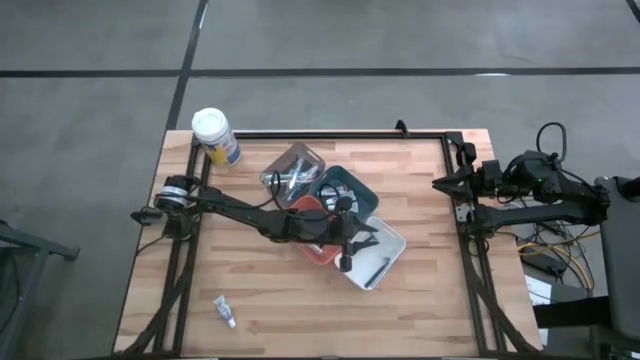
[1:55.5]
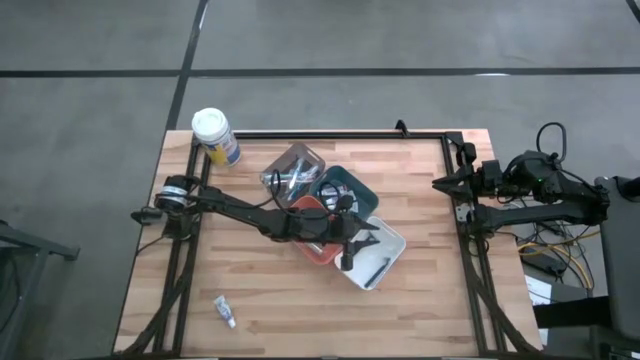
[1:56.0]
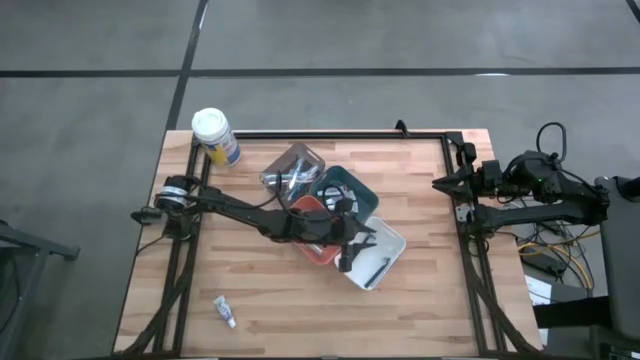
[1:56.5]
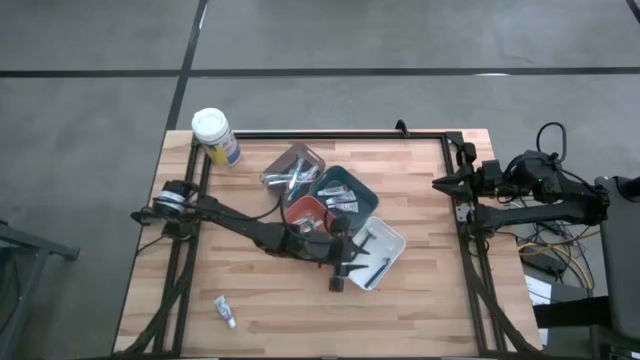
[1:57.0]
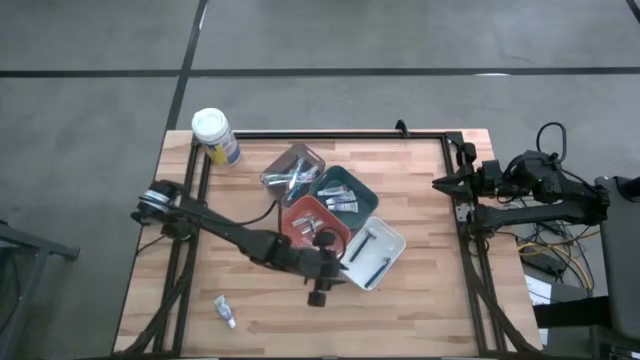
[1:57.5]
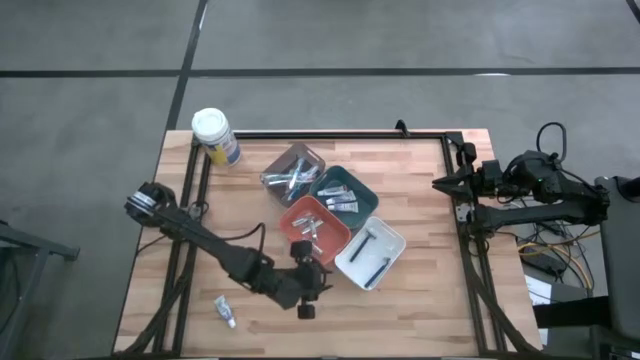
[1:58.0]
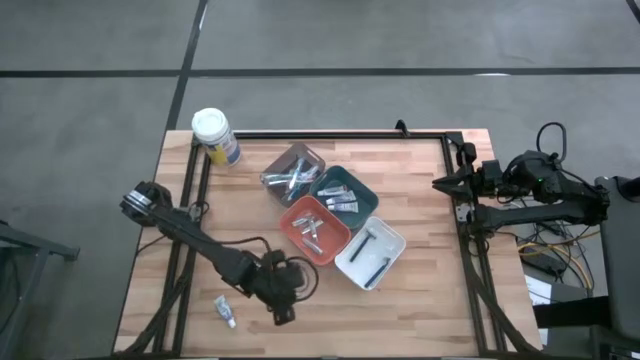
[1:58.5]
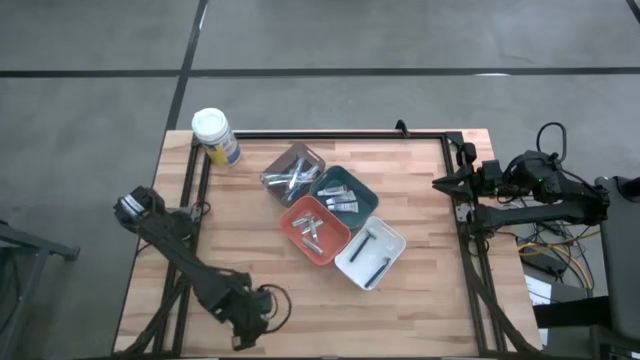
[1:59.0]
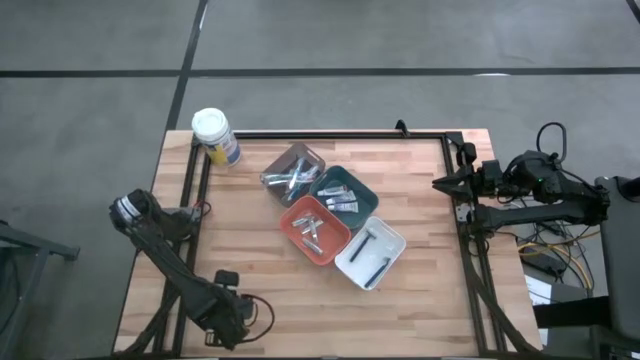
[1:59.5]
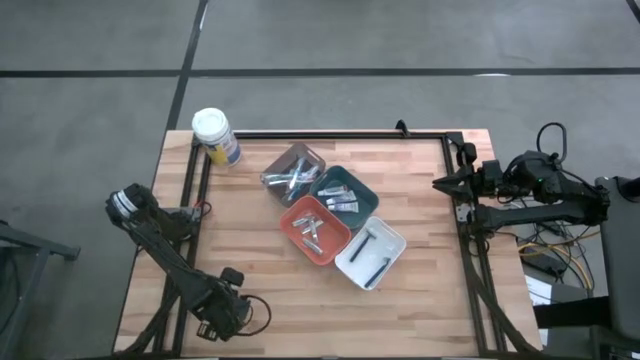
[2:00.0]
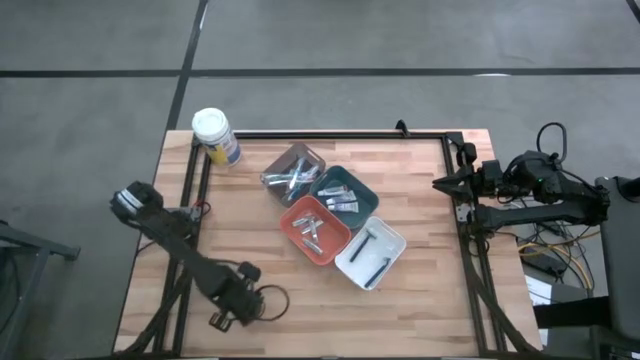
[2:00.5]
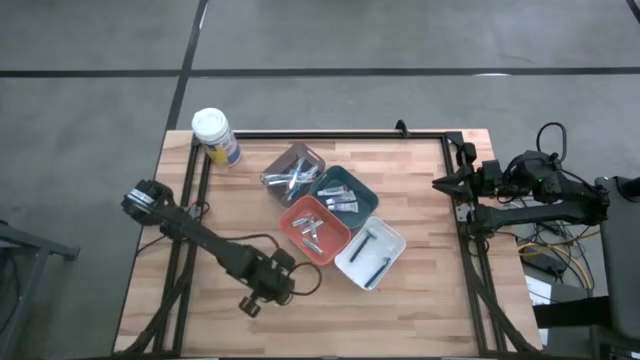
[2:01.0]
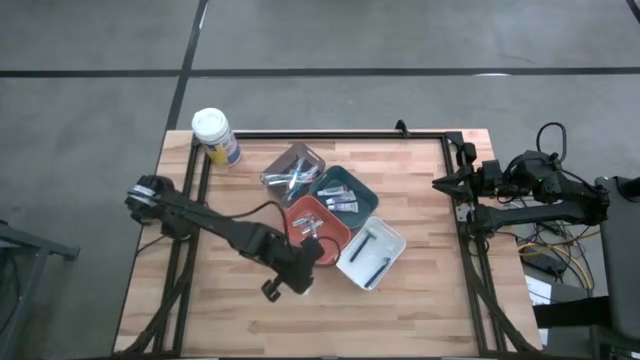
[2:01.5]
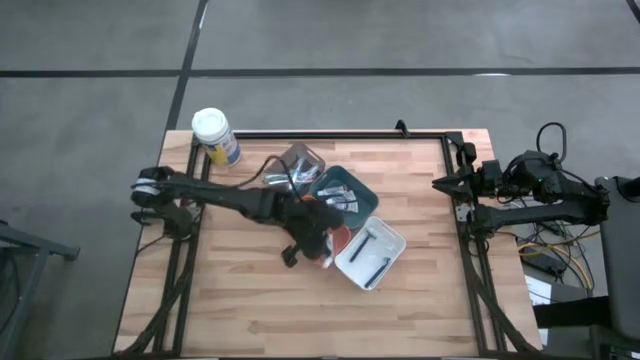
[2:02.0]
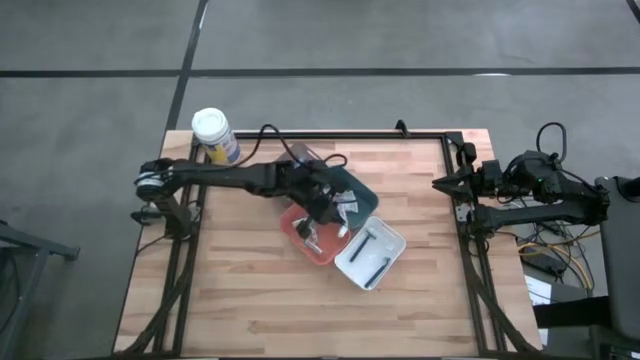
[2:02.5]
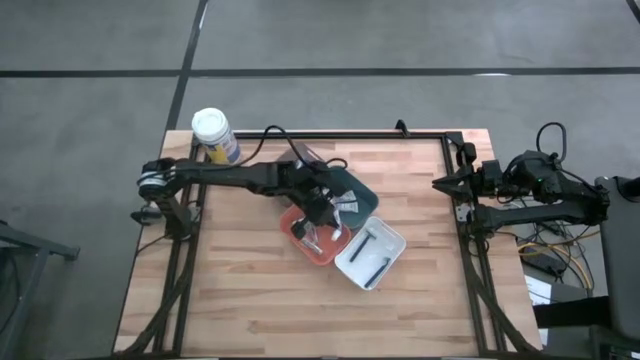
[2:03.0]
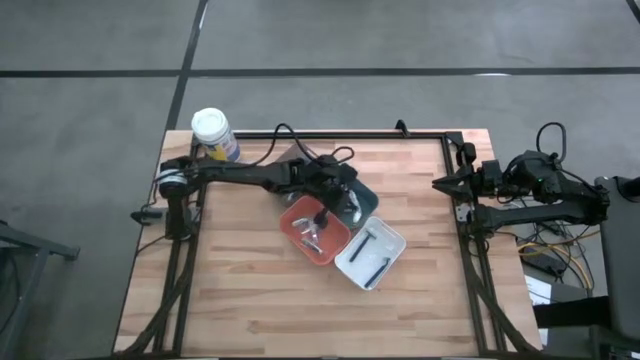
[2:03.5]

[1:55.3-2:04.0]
Task: Pick & Place Travel size toiletries
Put the white toothpaste into the blue bin

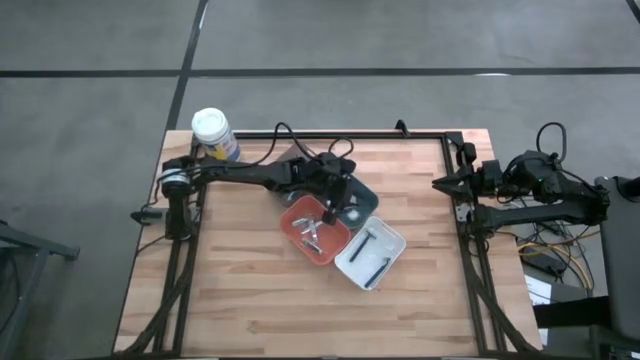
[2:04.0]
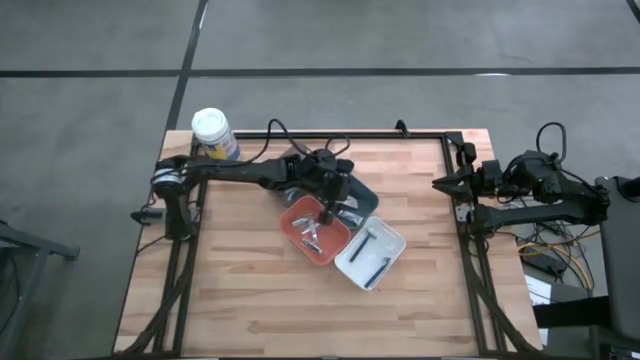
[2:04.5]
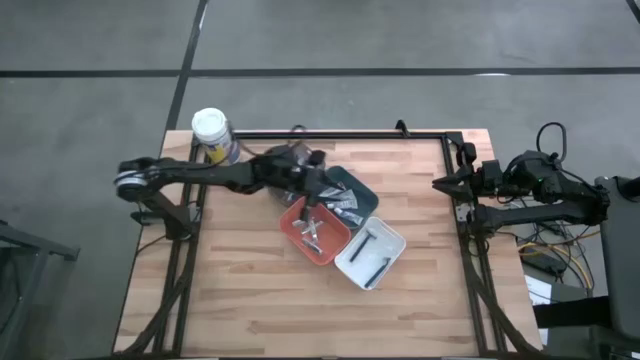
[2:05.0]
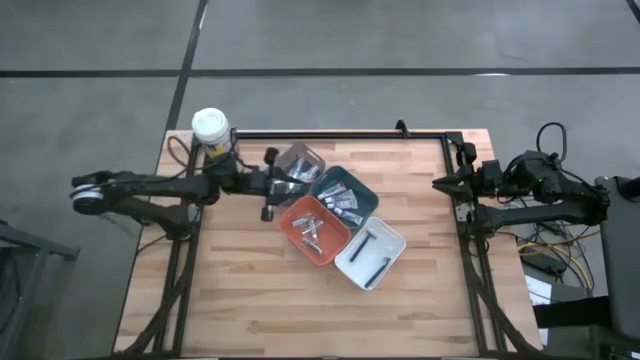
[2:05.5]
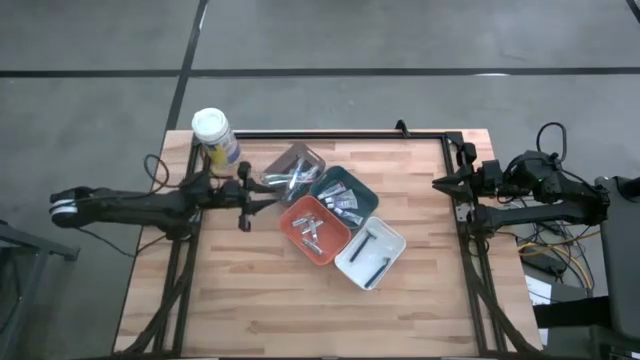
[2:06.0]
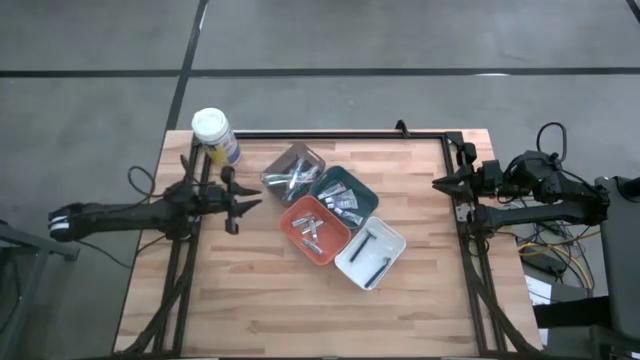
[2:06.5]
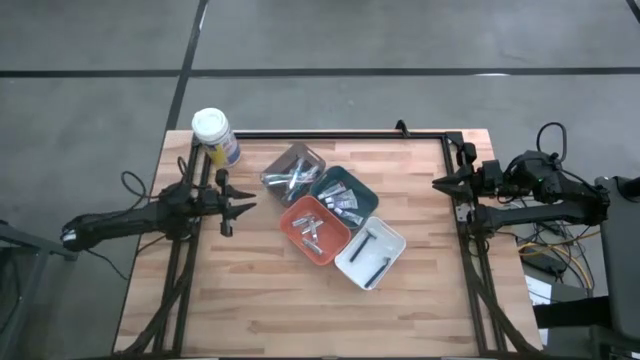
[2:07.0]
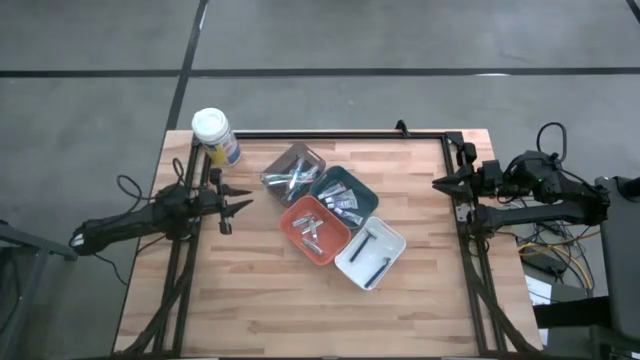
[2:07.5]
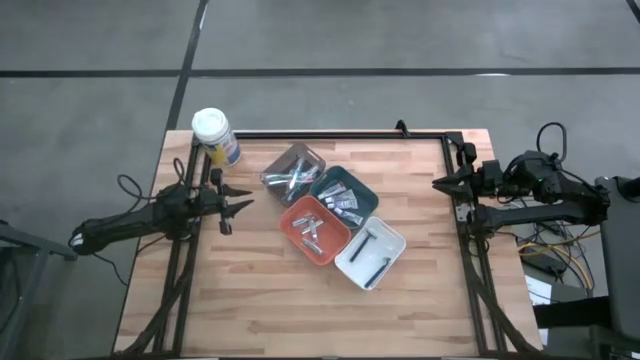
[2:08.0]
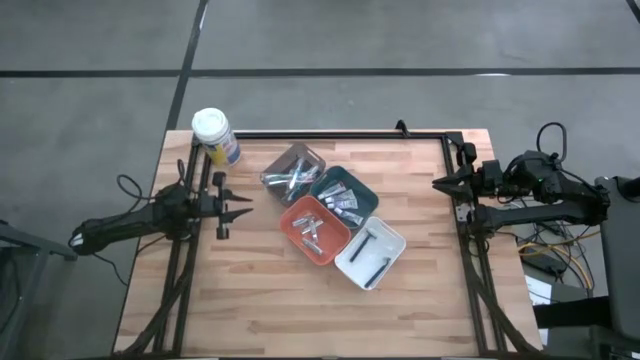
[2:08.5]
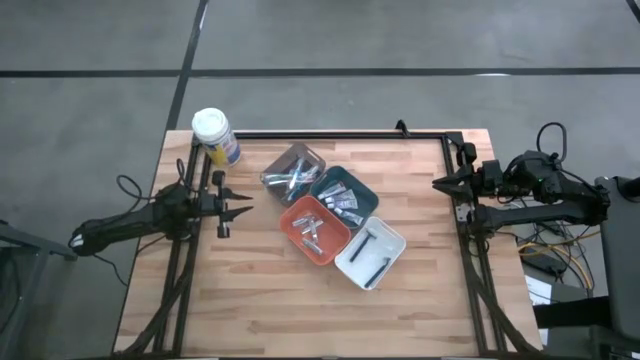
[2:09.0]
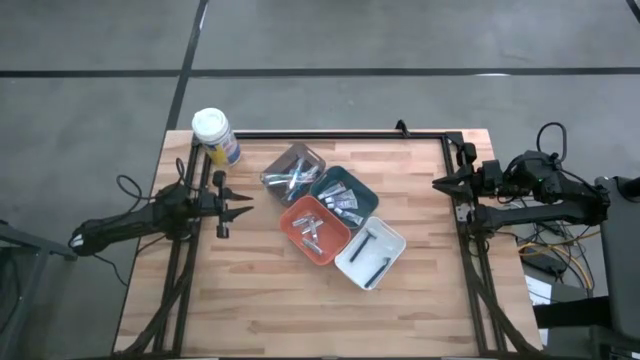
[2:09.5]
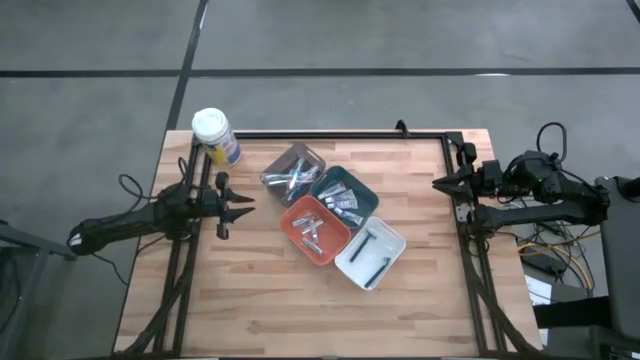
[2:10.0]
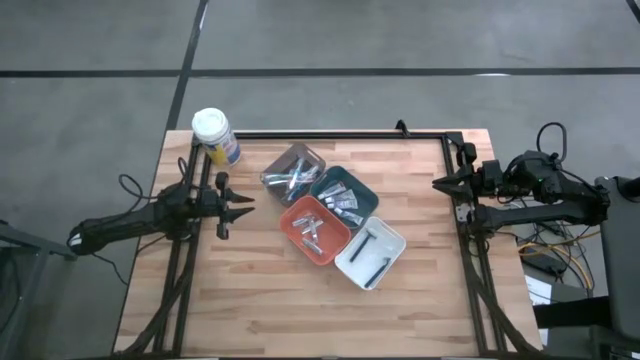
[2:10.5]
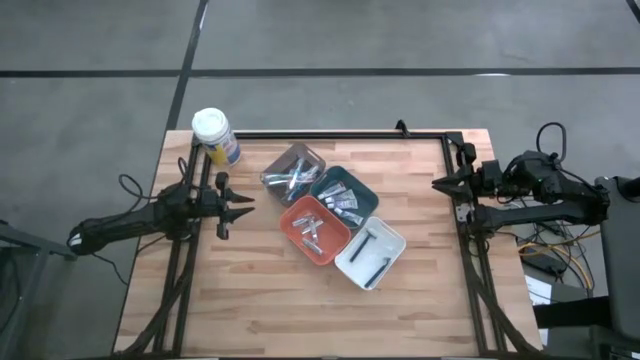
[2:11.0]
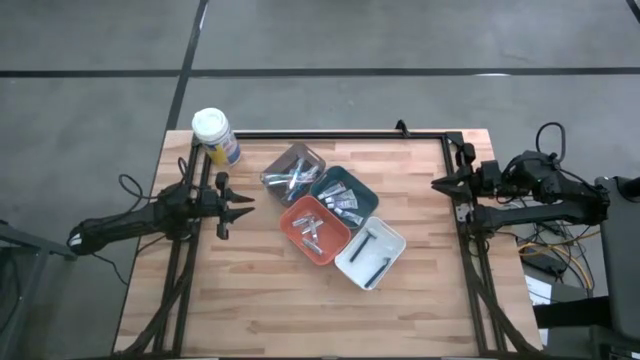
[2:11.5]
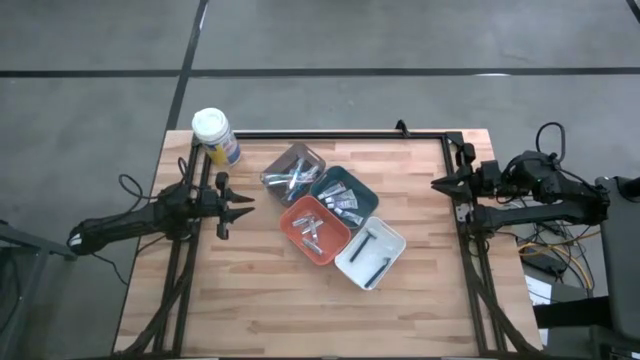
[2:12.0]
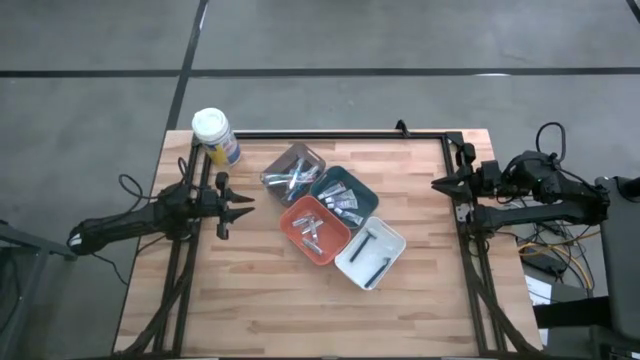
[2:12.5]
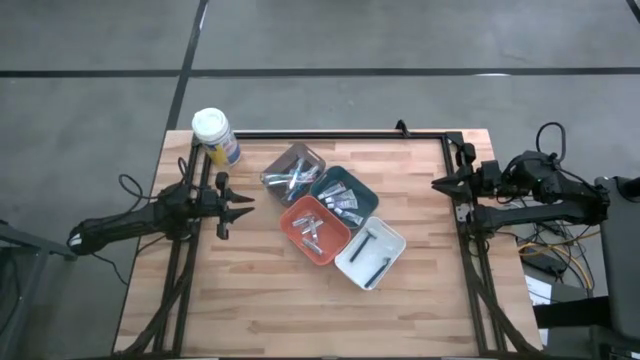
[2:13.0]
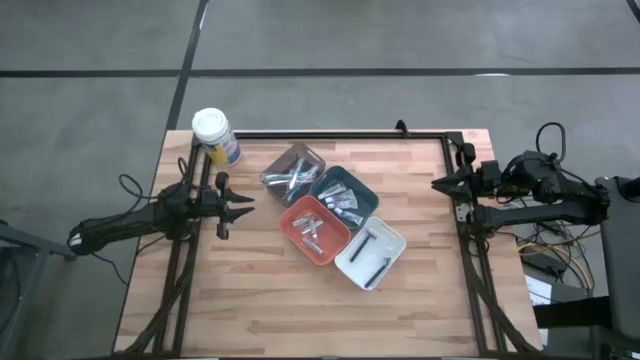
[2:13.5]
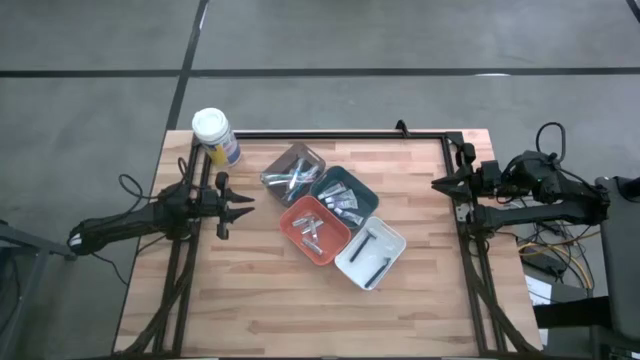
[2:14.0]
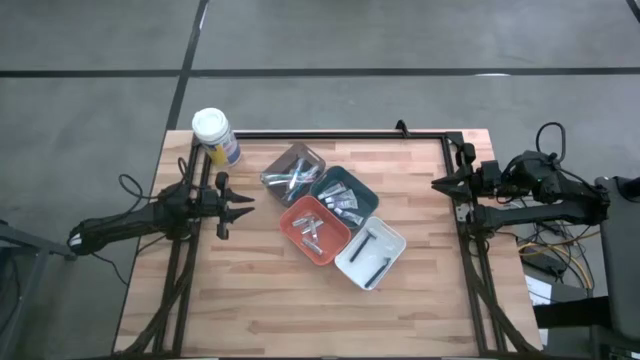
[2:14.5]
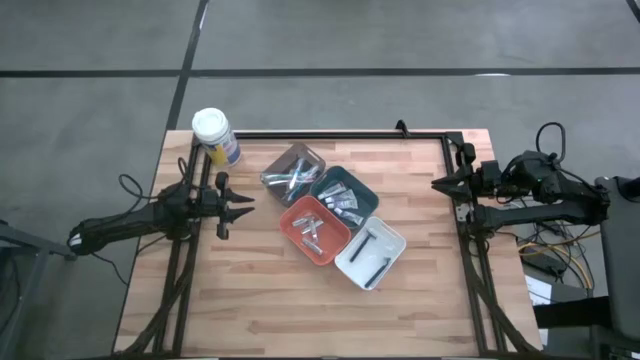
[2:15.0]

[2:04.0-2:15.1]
Return to Home Position

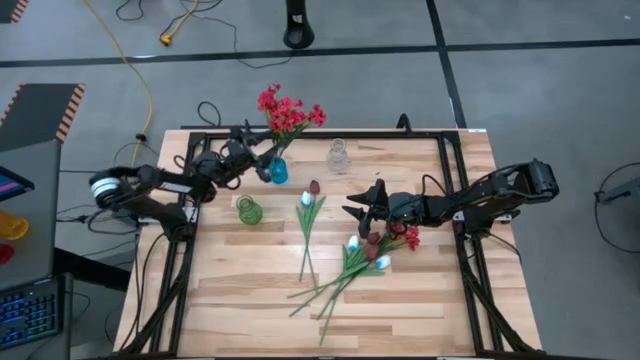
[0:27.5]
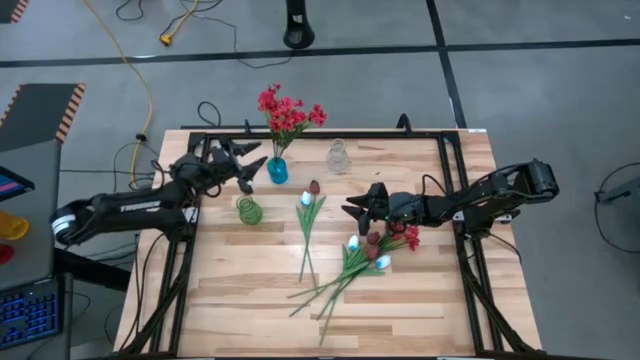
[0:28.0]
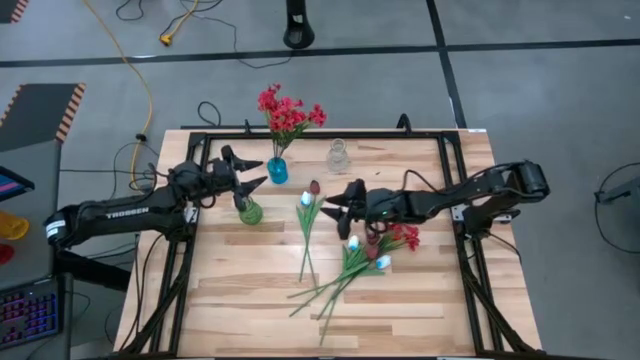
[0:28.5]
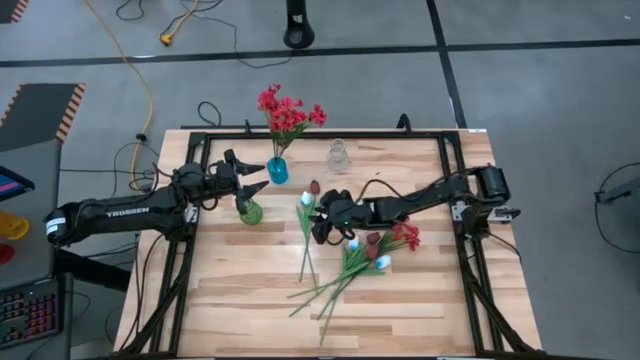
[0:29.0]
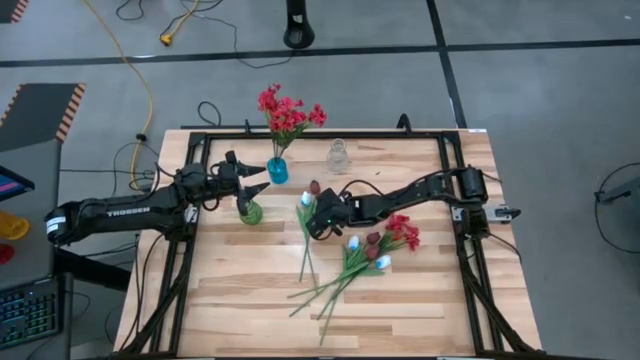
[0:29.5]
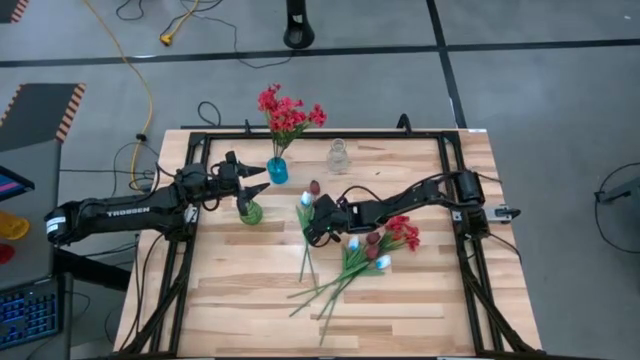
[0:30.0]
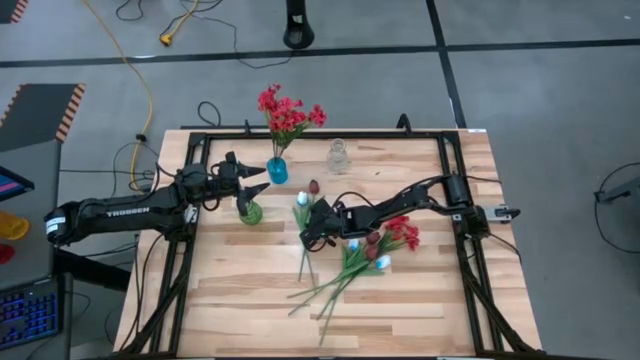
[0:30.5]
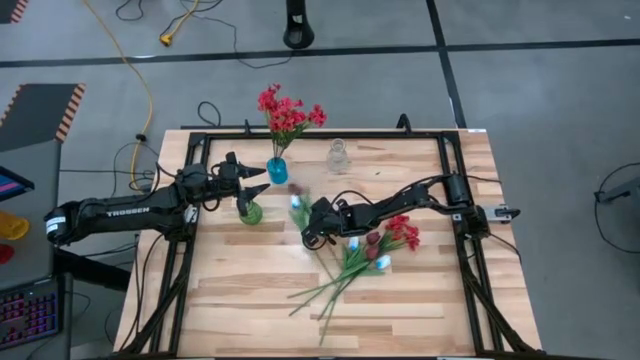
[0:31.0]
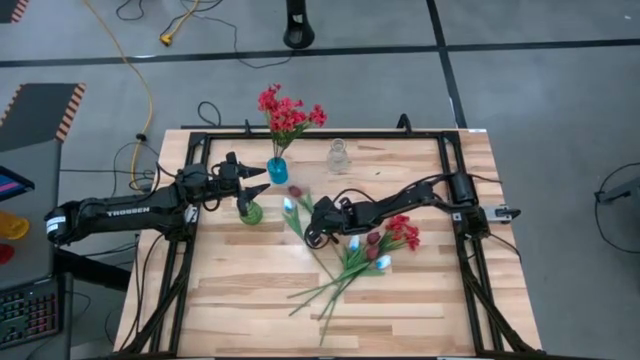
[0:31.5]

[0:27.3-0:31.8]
Task: Sort flowers into vase by color
Put the top red tulip into the transparent vase
